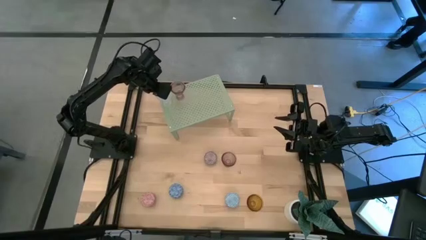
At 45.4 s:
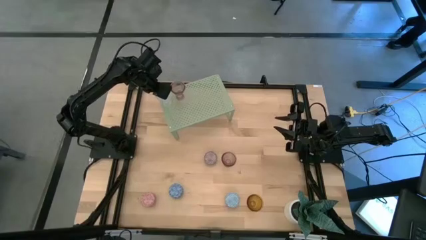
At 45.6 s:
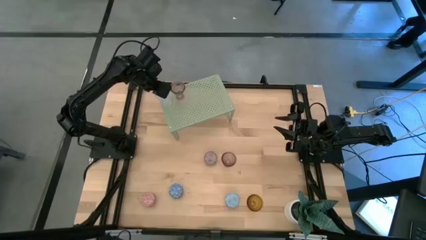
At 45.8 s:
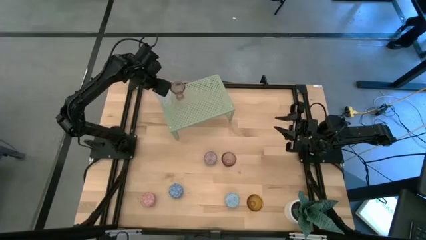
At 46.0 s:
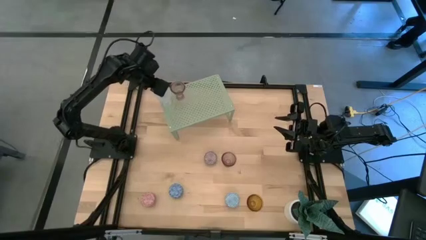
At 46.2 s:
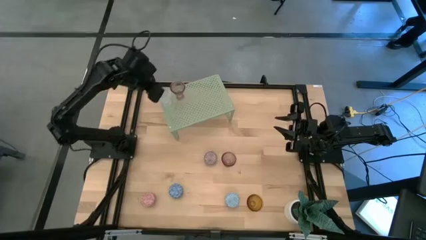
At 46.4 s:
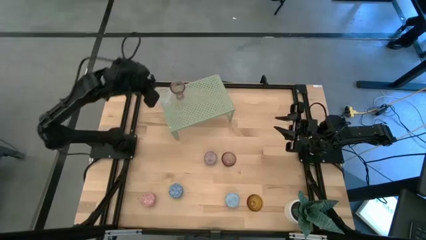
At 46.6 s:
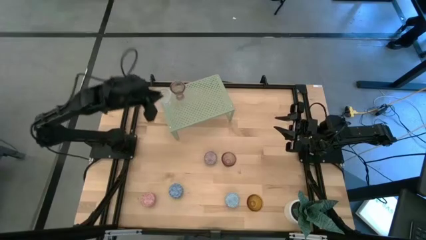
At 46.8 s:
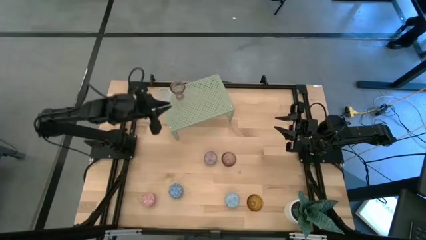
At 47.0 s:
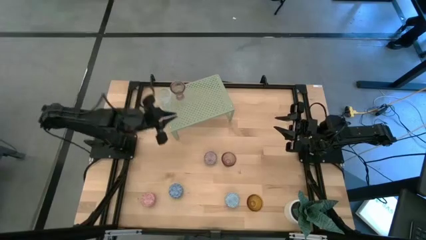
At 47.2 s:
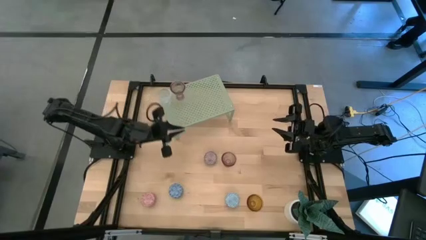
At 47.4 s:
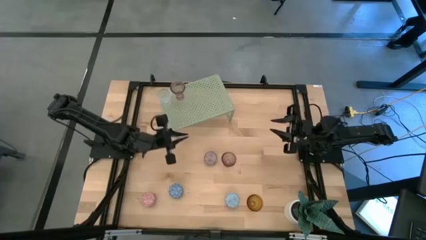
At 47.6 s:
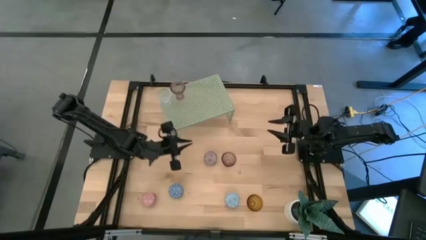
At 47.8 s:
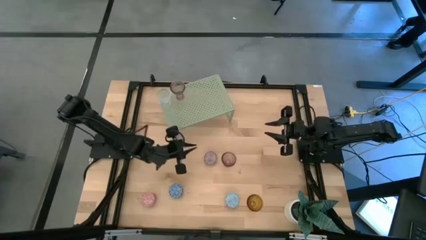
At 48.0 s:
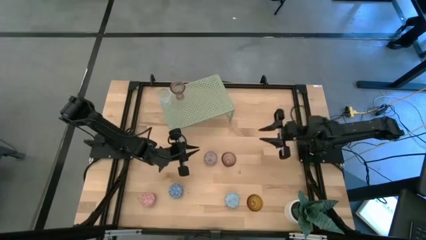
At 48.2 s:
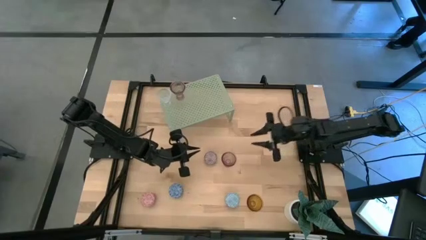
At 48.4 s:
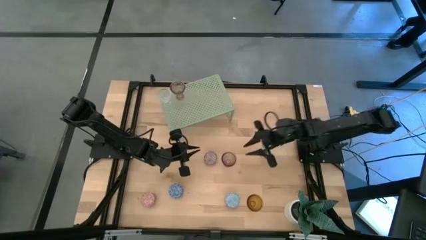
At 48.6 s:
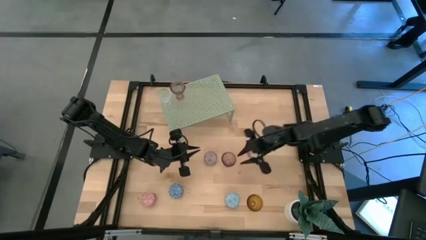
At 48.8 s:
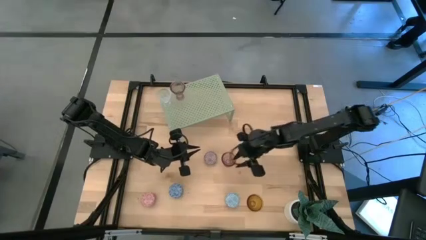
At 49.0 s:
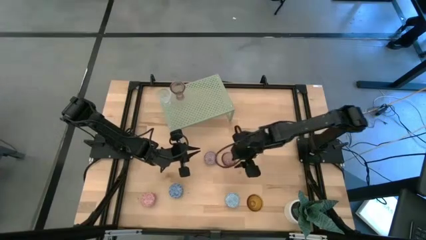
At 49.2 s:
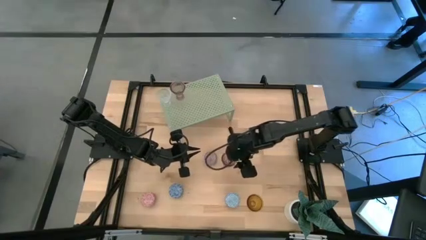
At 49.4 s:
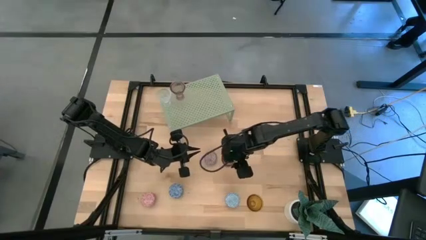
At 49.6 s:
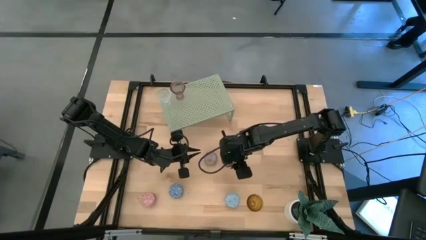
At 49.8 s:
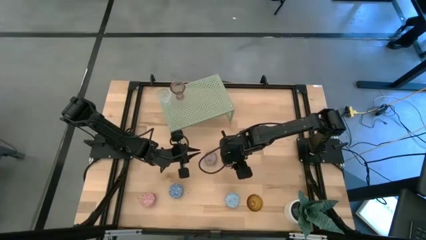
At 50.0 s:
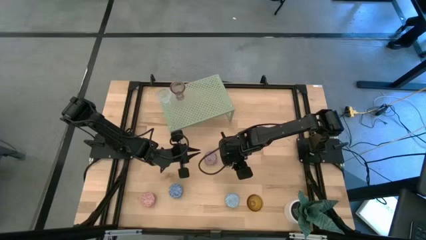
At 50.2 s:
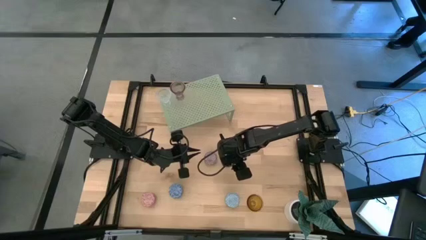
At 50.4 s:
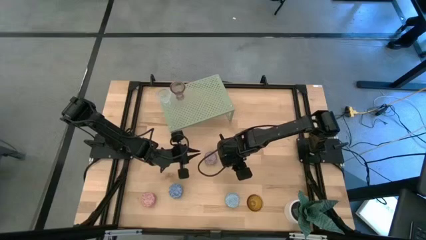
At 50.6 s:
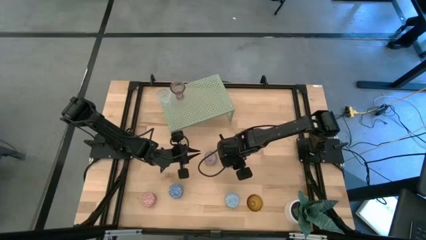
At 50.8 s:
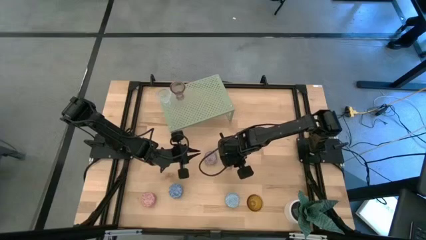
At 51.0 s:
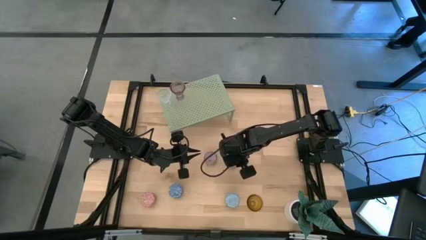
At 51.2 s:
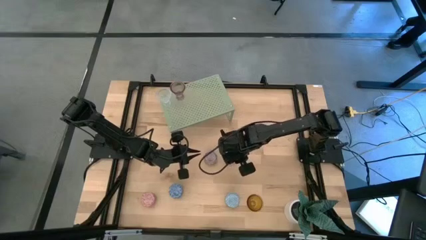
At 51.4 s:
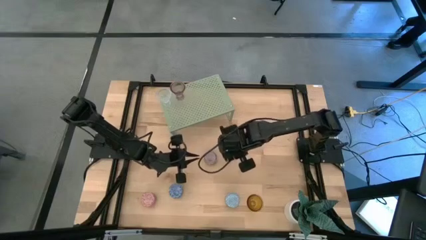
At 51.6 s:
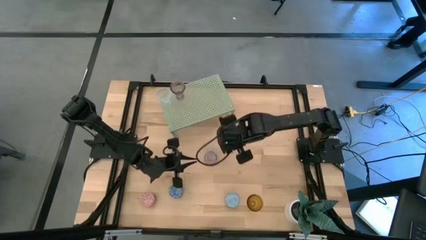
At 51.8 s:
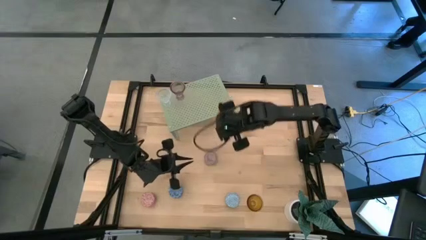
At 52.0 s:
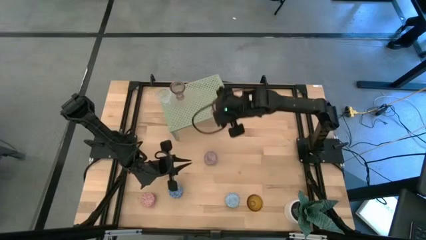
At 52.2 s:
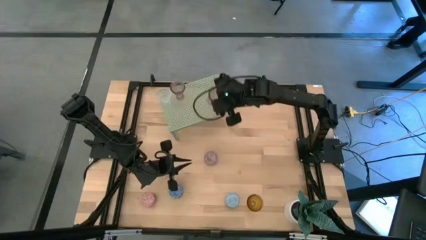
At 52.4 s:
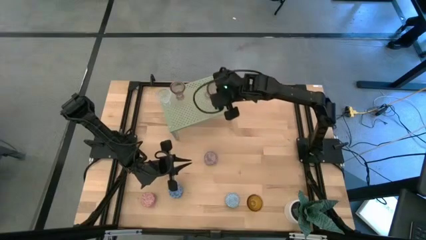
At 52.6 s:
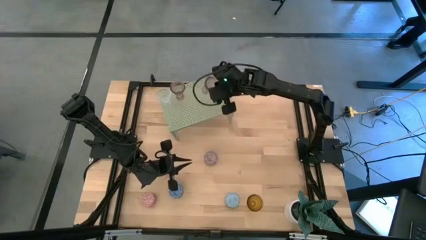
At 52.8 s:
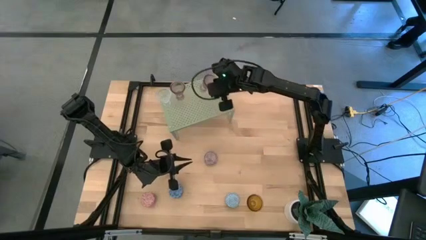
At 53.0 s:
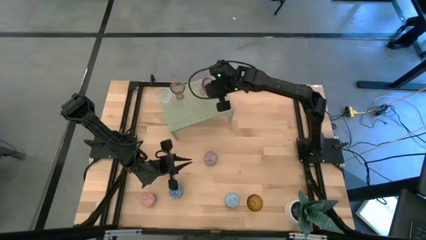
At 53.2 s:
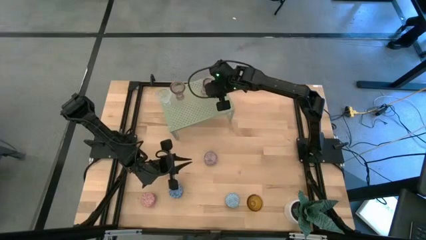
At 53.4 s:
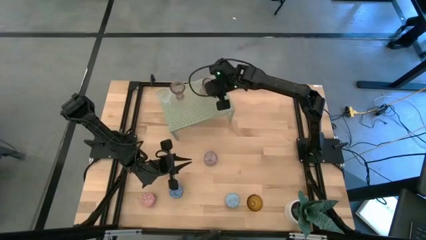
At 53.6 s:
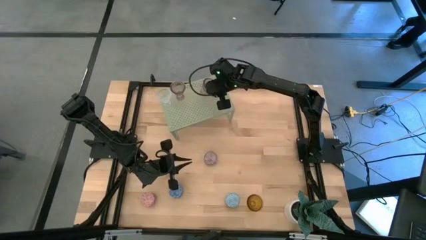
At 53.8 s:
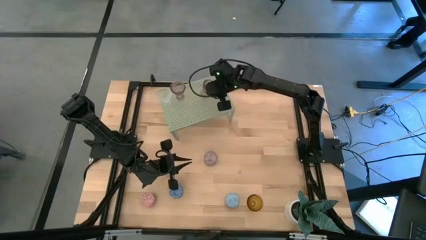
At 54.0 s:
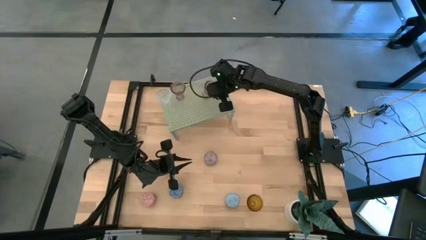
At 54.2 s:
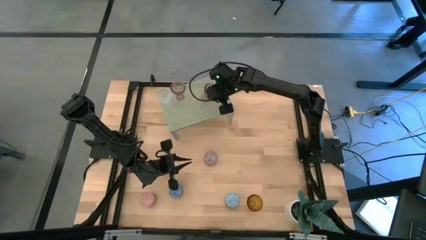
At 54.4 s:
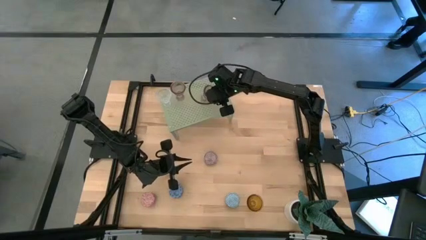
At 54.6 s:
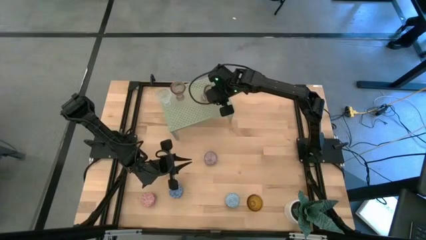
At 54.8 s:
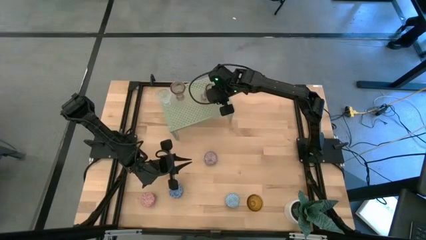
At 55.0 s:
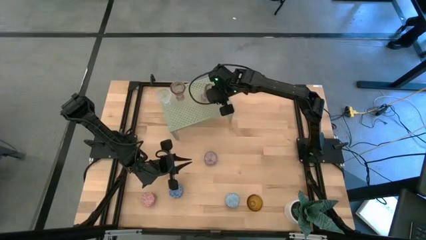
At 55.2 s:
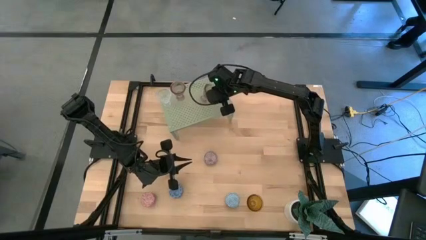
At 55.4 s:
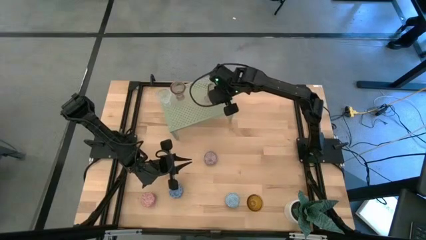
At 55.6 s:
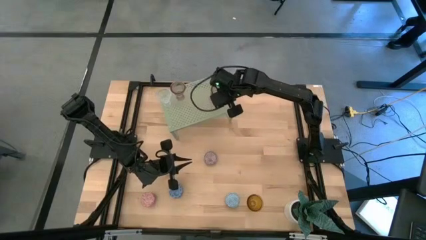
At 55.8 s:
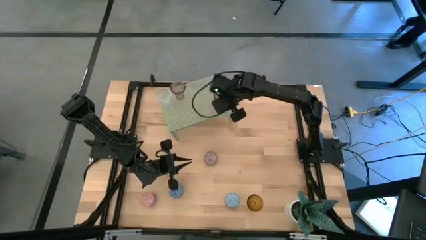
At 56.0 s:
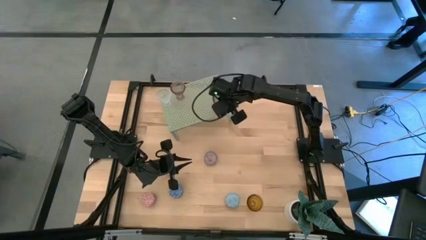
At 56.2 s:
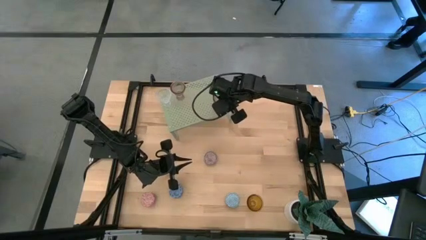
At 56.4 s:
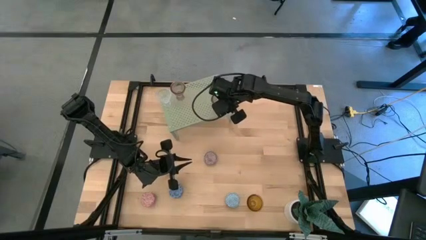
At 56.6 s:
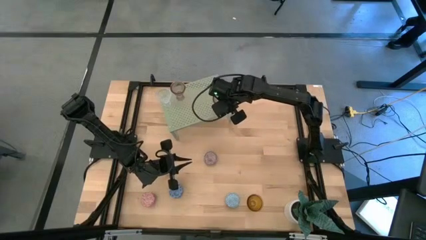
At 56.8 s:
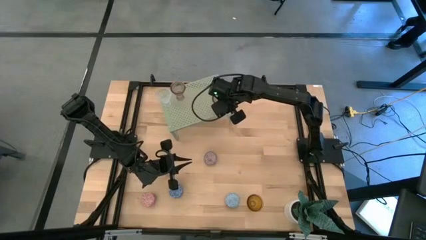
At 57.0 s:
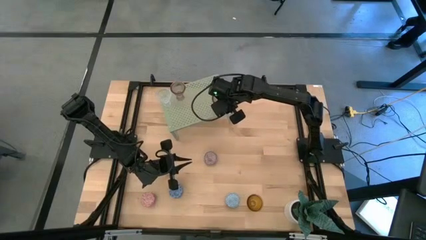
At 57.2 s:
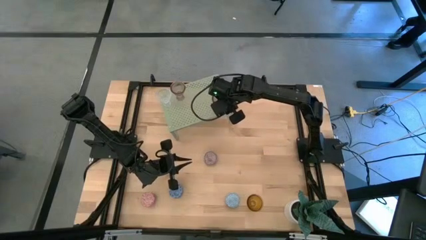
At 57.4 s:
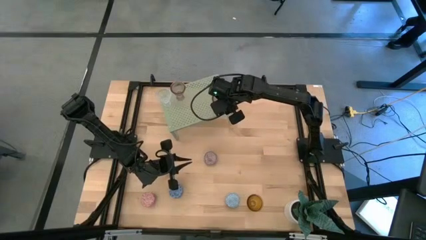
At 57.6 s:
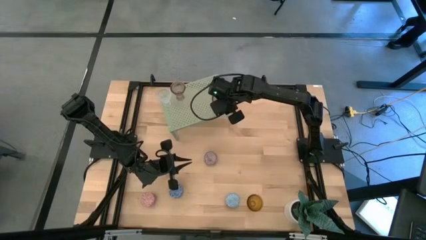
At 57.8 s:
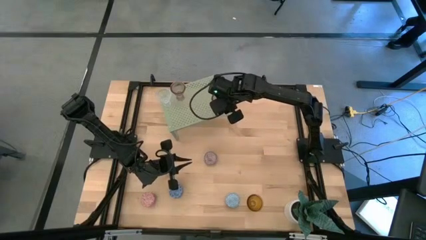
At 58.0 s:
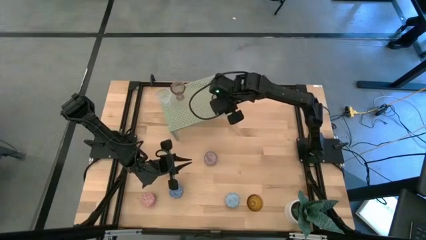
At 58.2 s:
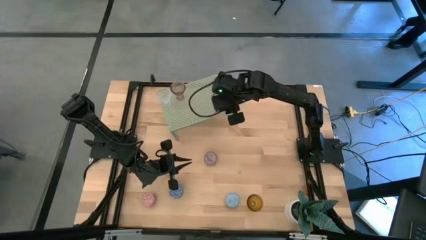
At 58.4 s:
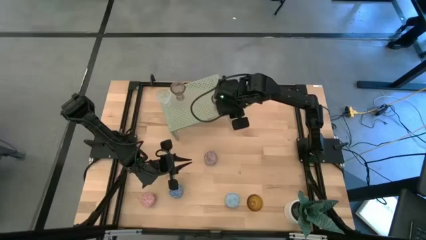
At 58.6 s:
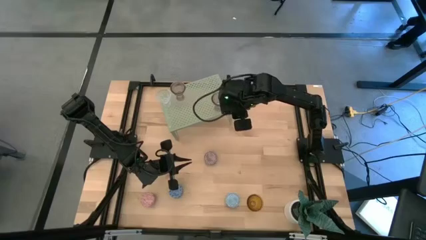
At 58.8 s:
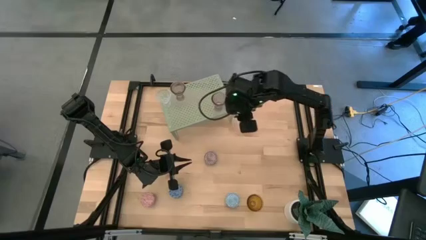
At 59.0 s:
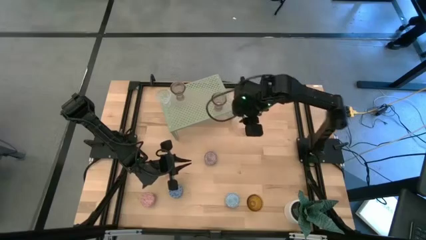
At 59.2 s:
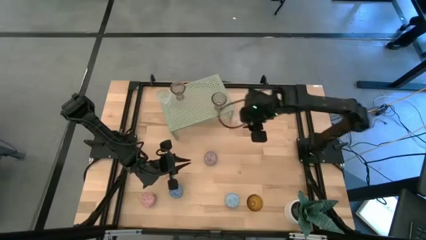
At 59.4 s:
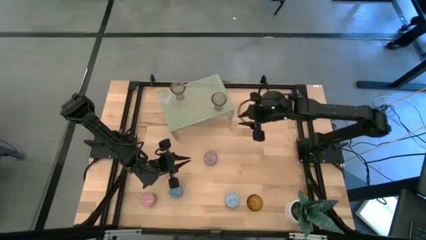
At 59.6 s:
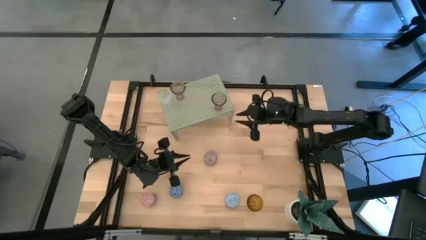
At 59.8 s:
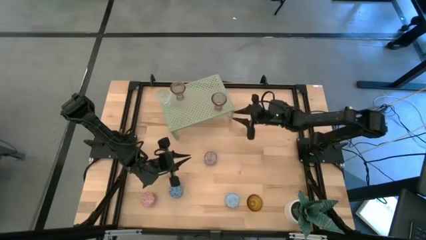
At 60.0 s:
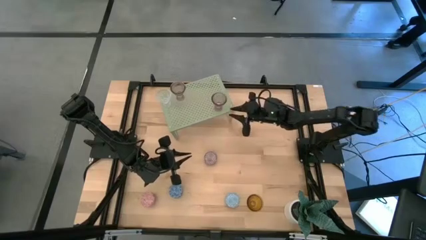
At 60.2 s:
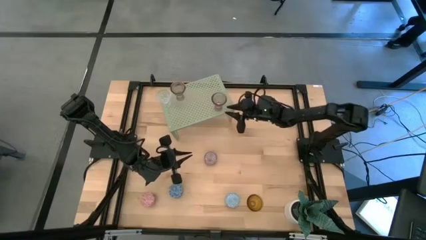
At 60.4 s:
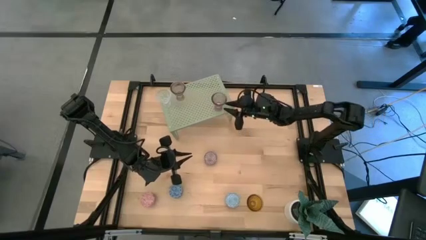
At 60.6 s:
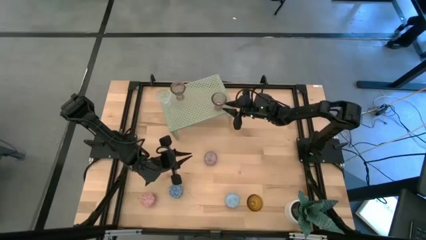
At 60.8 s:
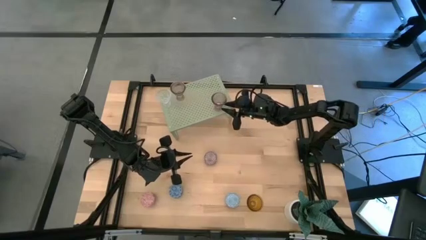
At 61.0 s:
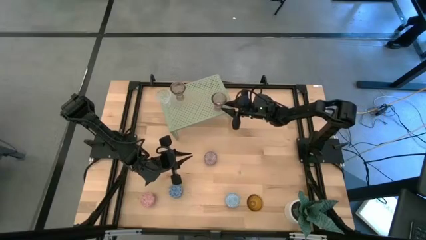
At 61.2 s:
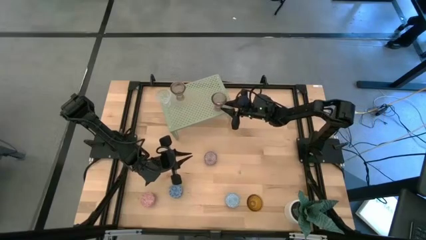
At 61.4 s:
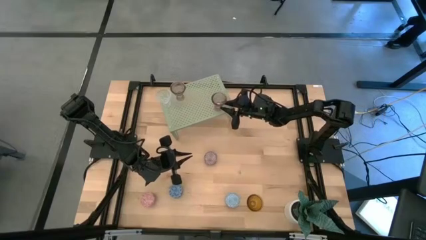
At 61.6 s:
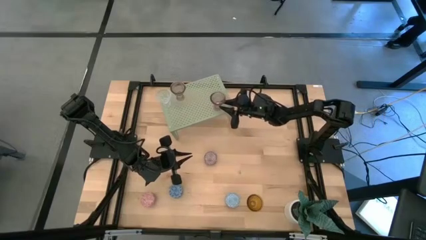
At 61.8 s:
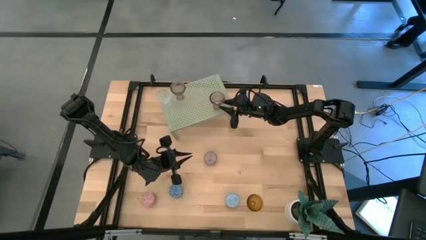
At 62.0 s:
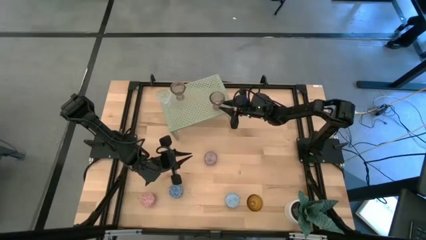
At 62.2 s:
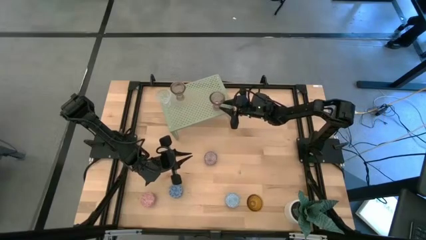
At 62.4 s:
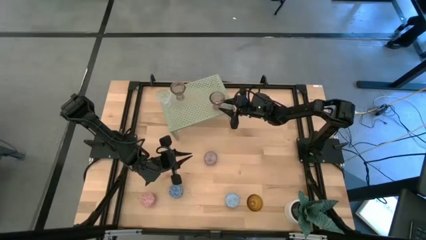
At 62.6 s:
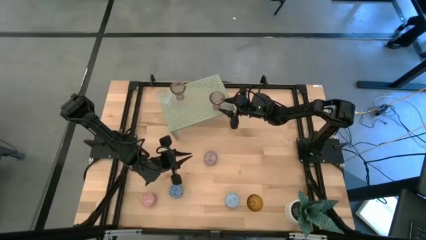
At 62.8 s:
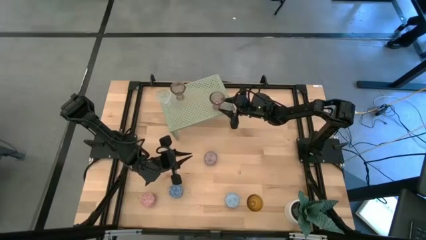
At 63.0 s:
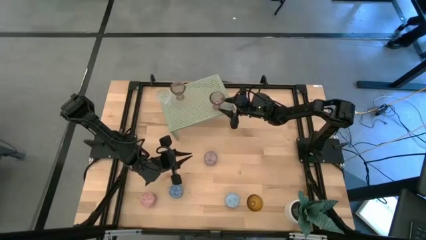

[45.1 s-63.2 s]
Task: Pick & Place candle stick holders
Put the pink glass candle holder on the shelf aligned with the other glass candle holders
